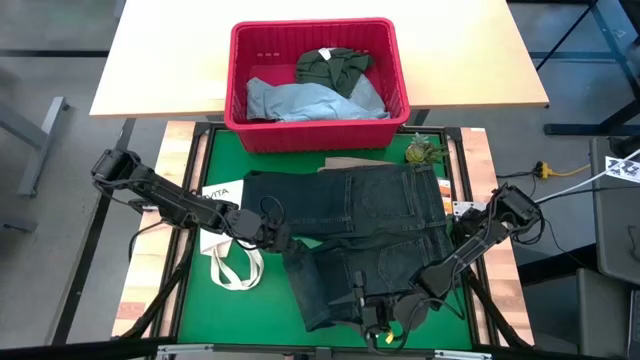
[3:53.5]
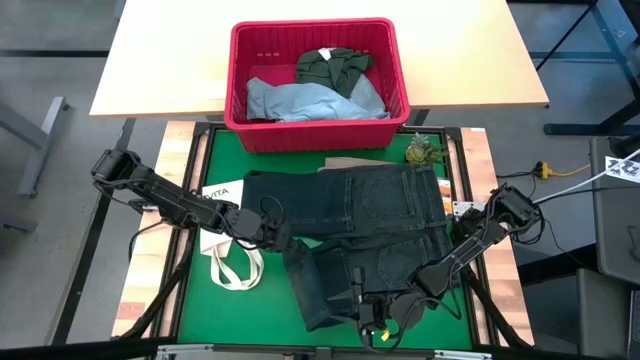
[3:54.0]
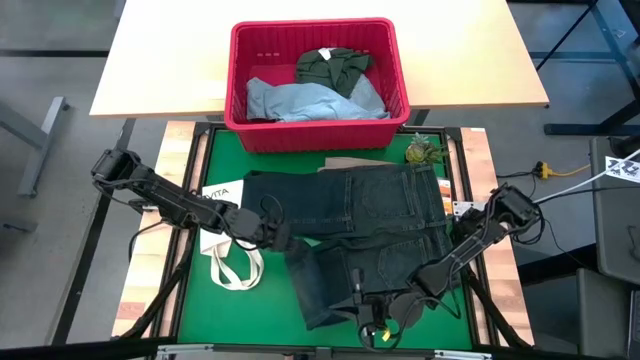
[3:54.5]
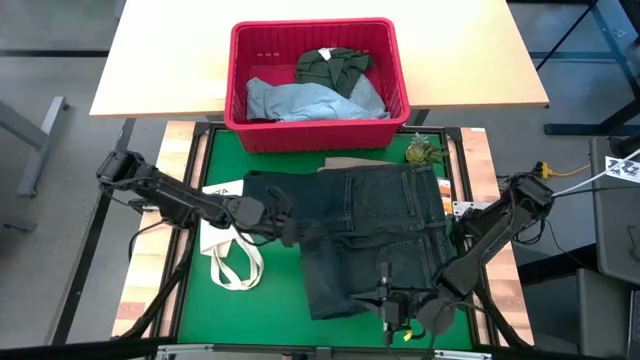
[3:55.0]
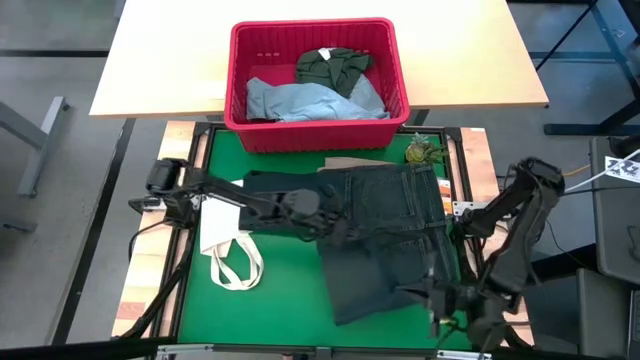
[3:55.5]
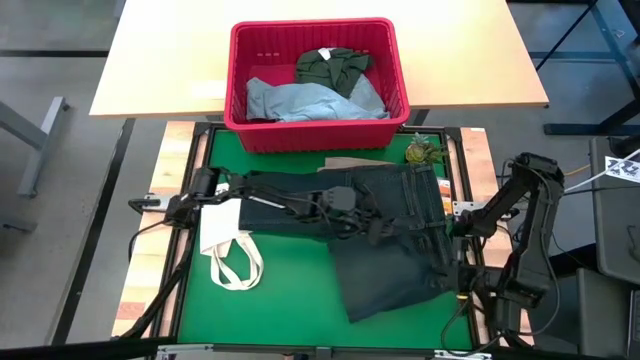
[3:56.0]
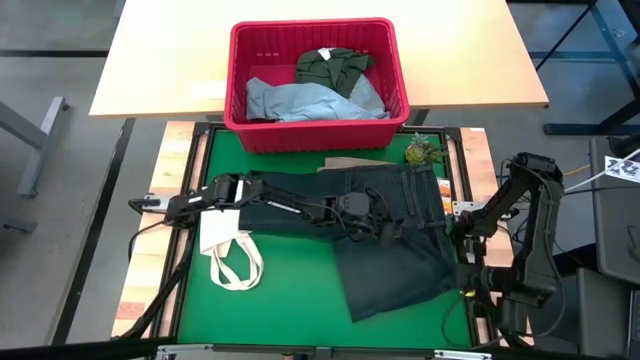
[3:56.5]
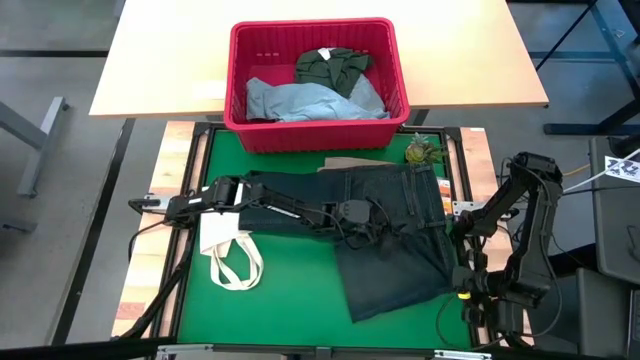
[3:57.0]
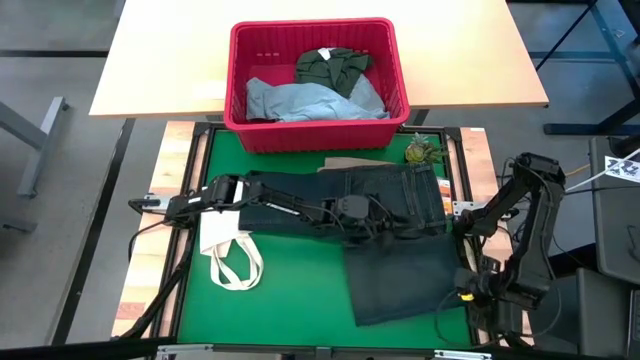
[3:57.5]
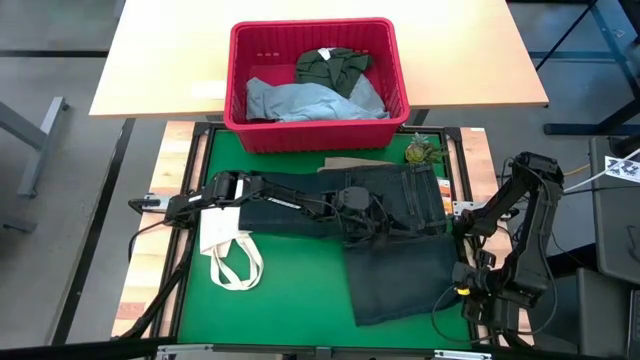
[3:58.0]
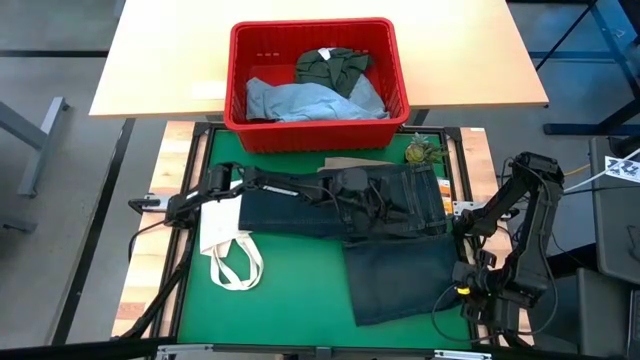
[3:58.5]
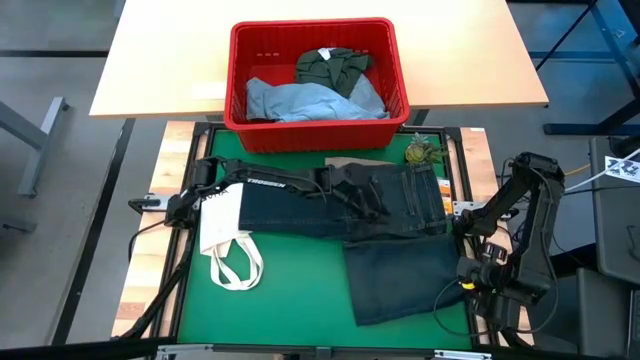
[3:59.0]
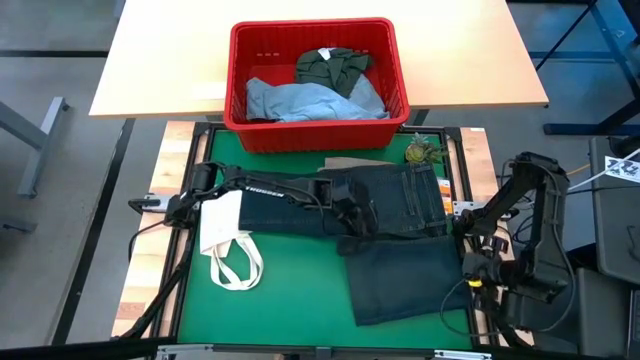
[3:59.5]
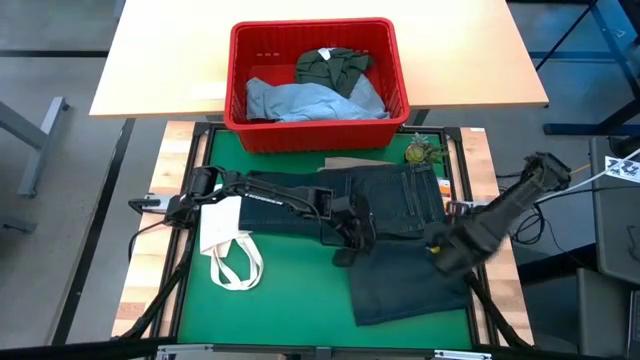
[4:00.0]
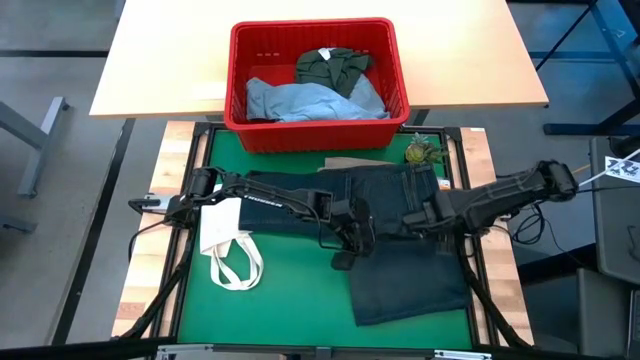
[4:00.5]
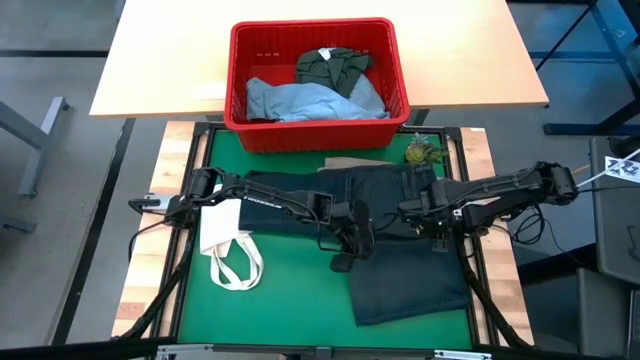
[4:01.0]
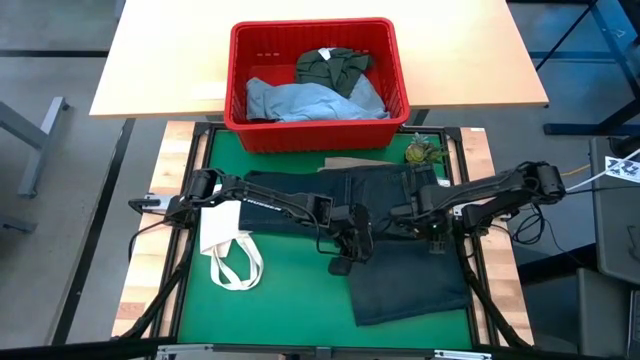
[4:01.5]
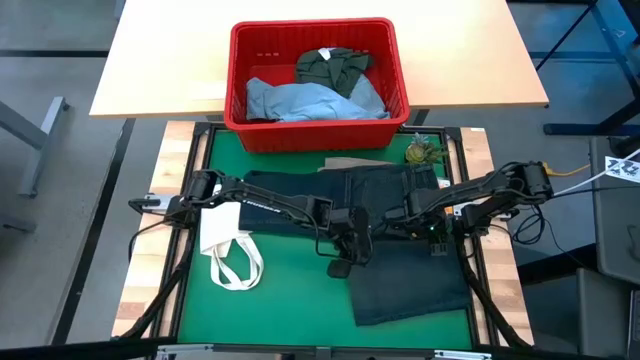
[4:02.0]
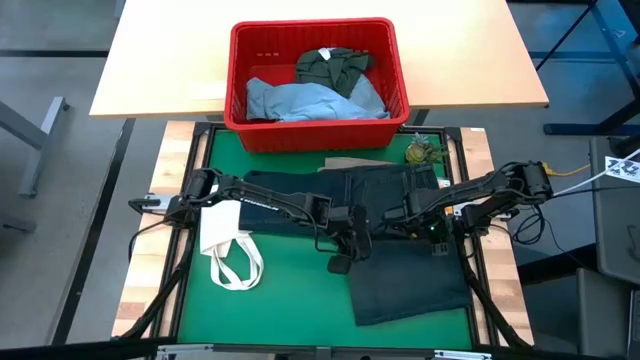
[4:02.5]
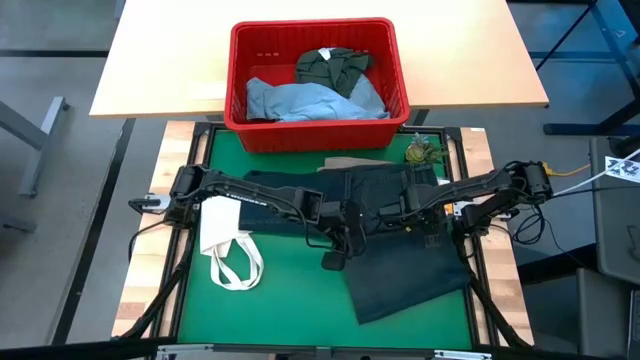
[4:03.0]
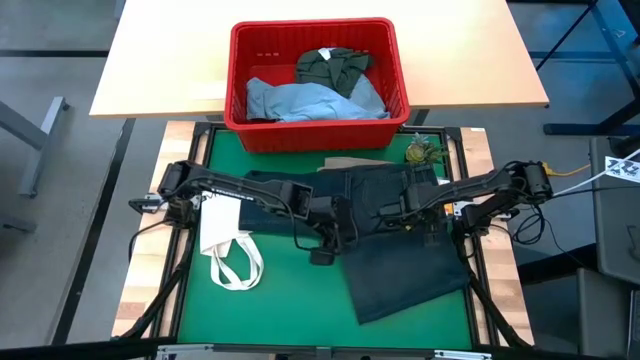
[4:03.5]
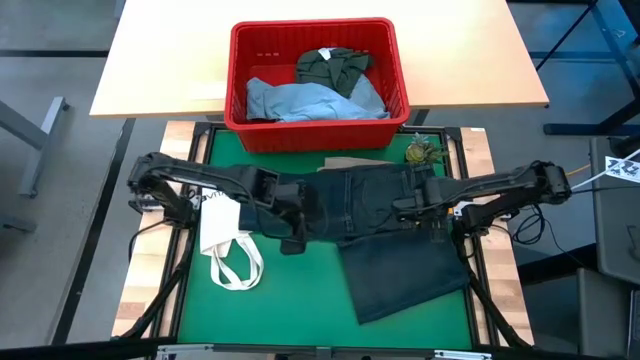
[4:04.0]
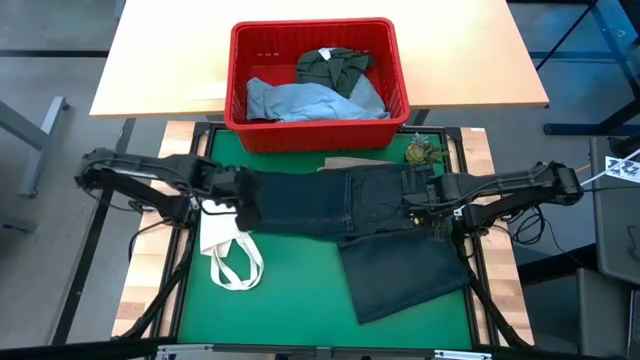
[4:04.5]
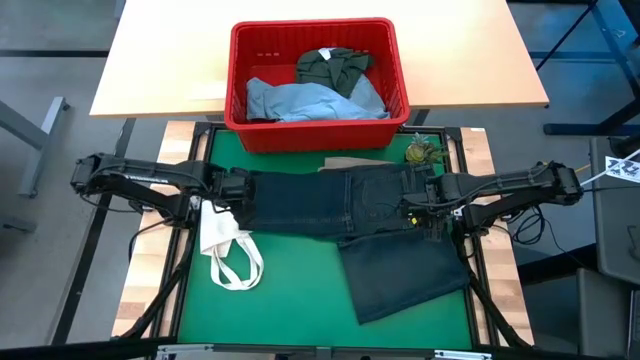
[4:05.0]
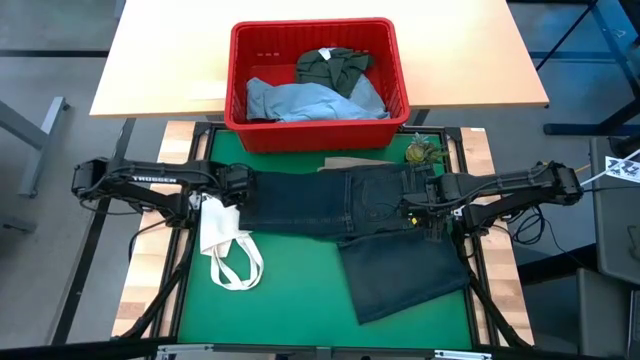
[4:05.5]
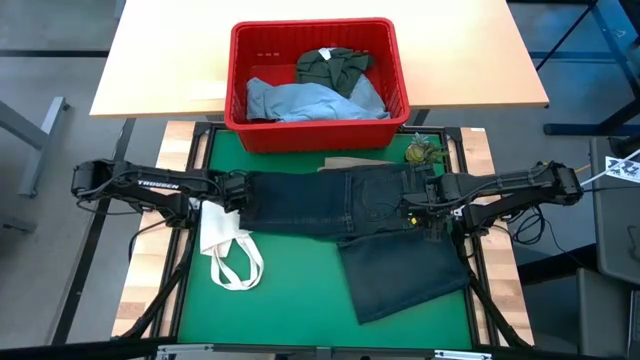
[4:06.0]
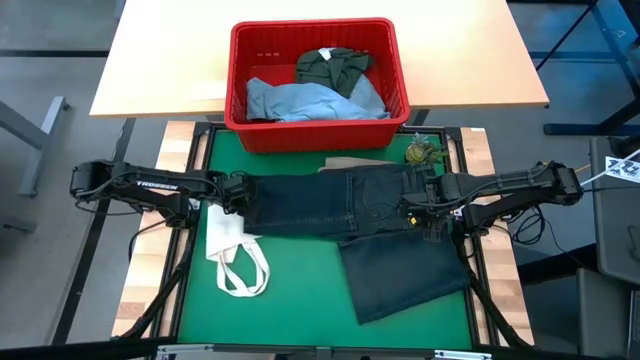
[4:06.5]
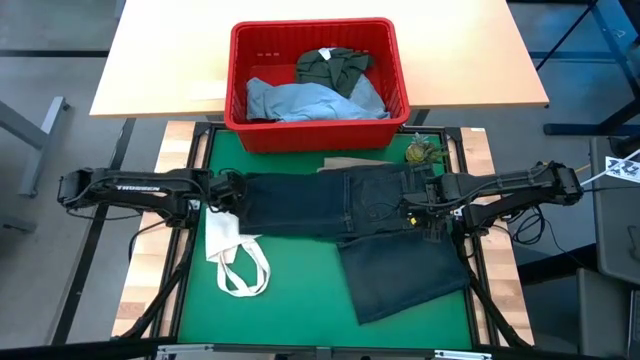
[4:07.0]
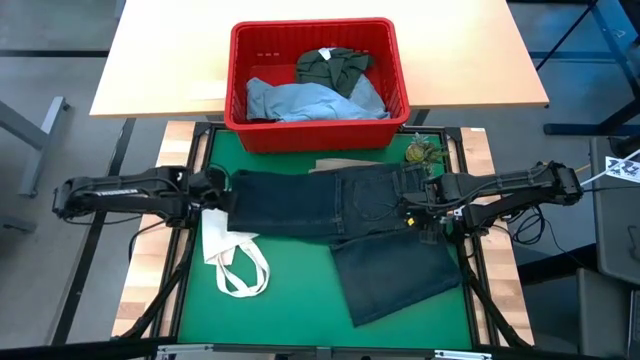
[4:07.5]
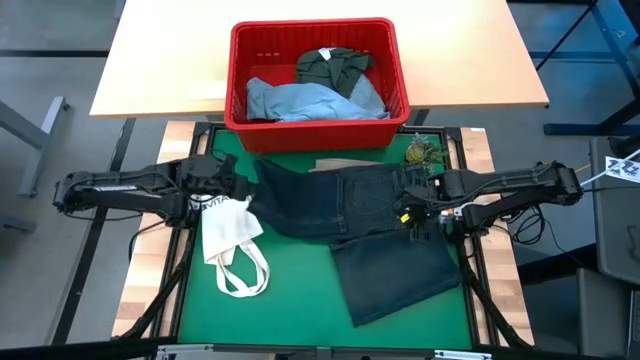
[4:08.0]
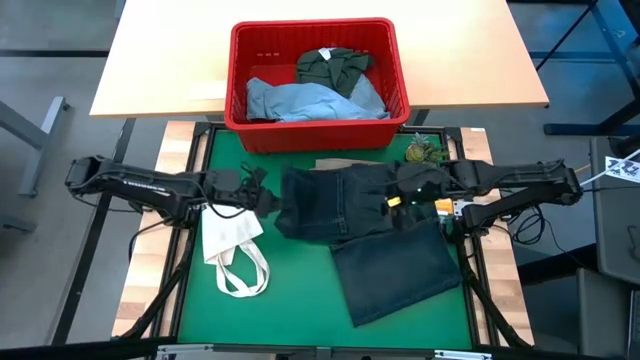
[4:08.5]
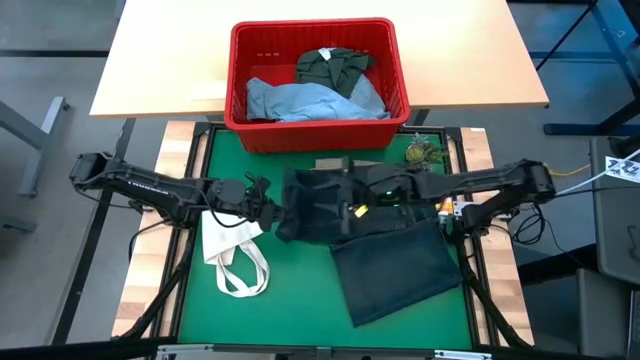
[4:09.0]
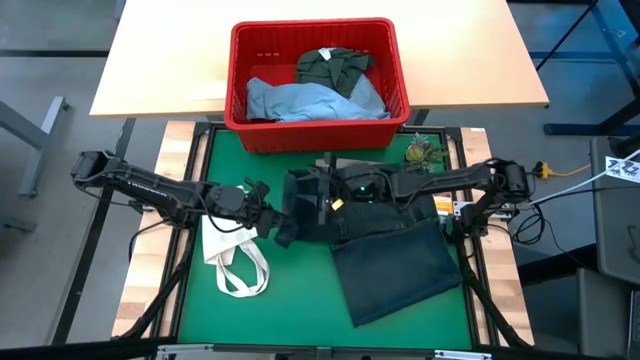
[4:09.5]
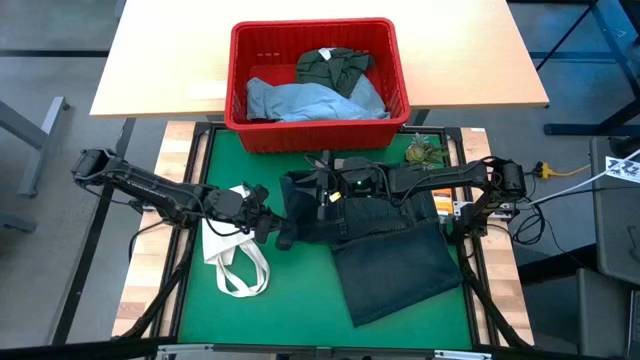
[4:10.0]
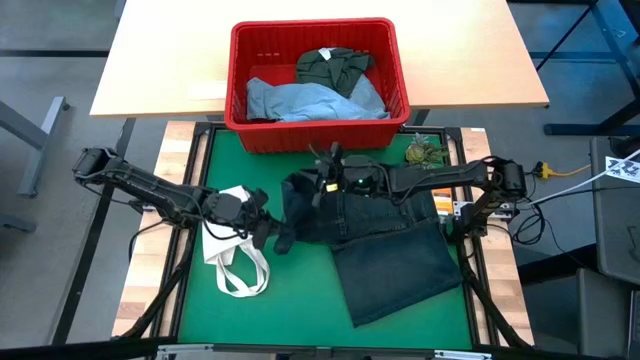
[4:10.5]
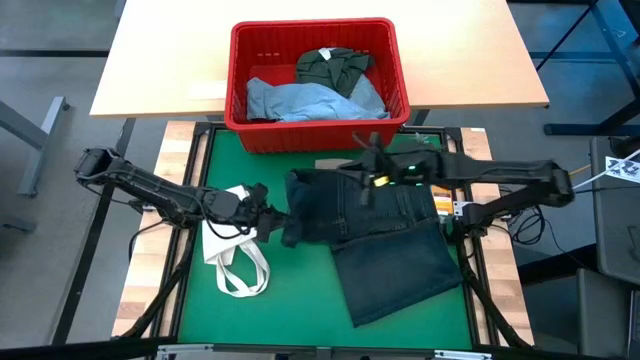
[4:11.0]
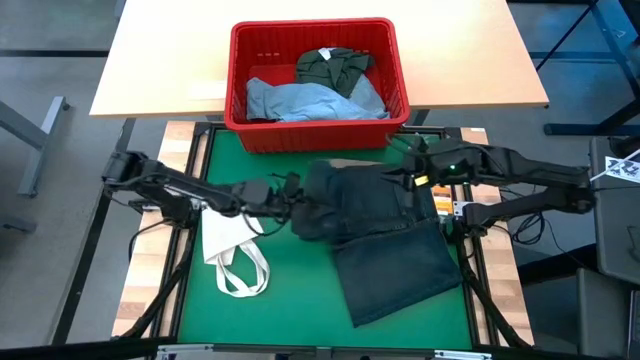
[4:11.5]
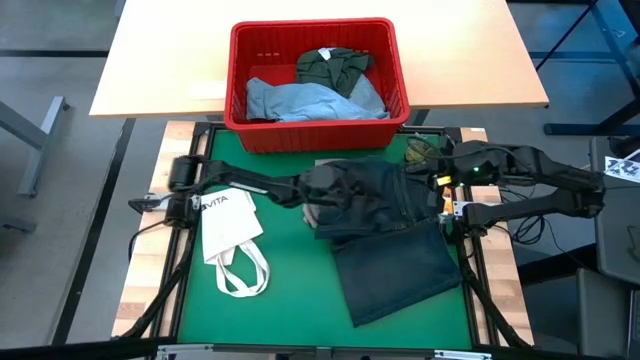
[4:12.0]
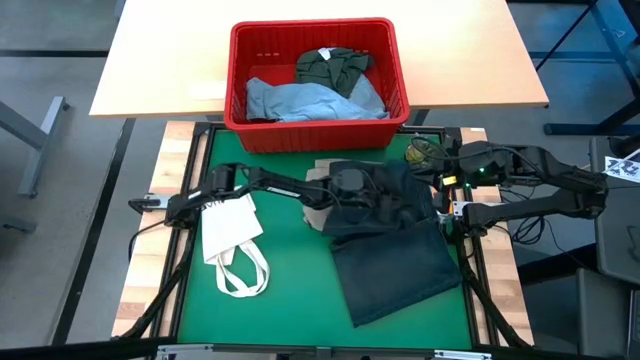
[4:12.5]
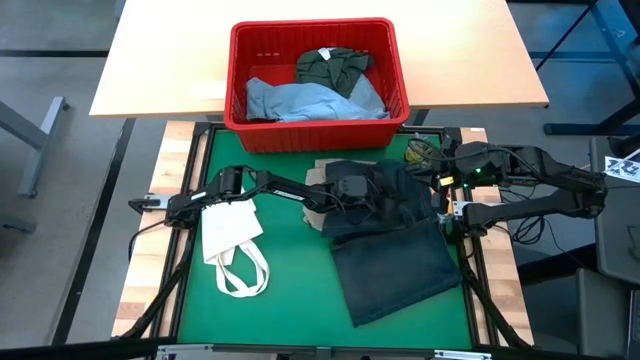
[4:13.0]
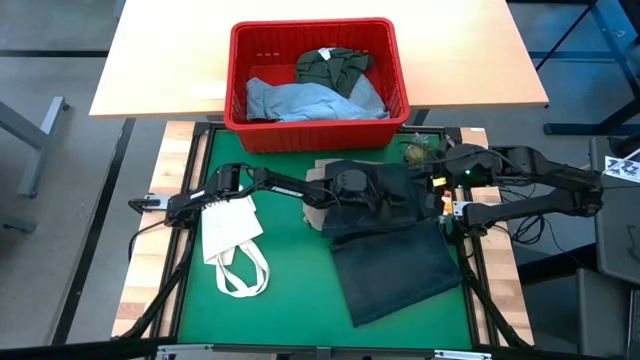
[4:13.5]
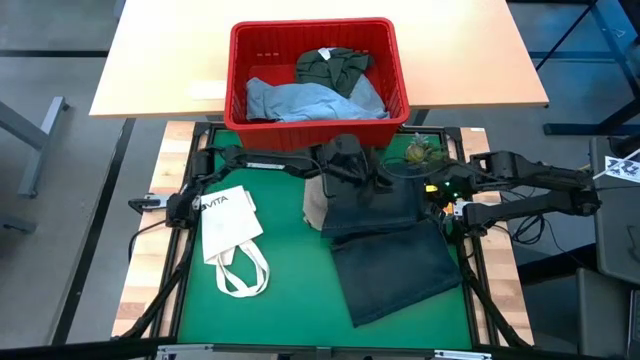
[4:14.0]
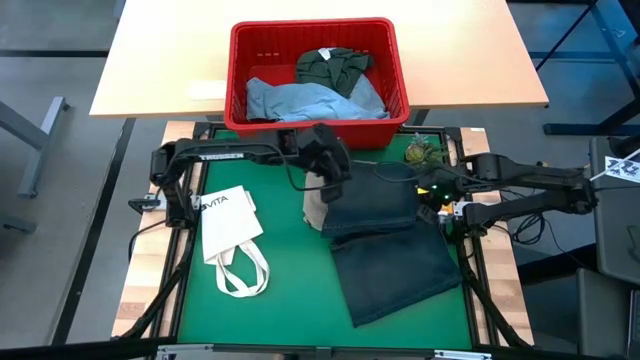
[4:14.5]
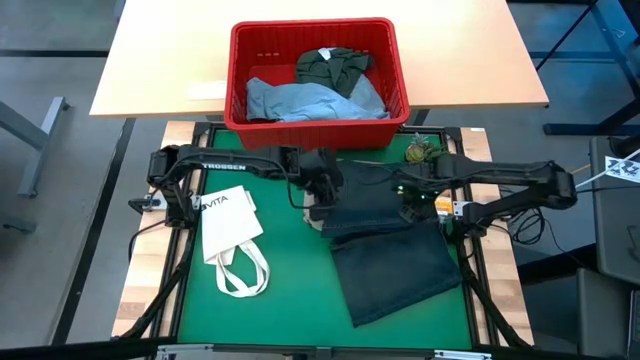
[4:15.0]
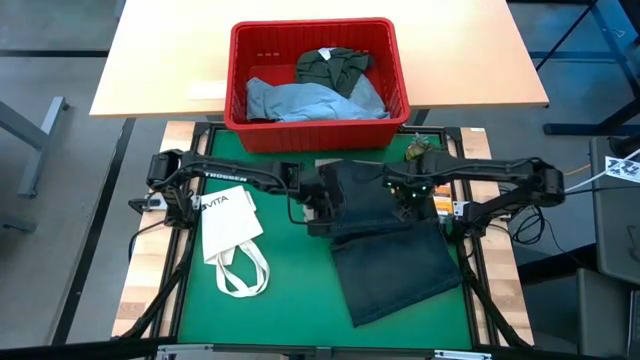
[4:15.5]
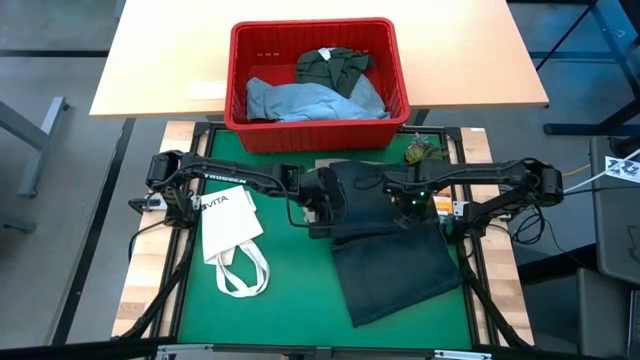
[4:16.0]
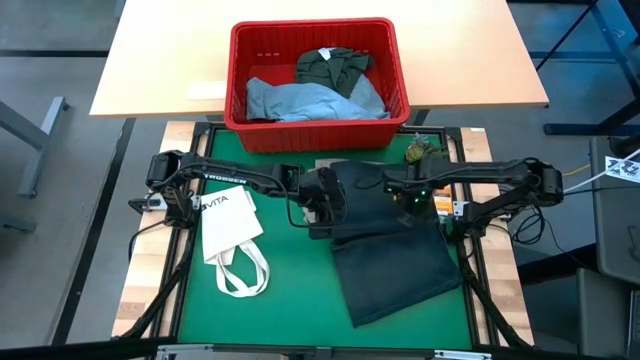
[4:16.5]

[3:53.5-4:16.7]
Task: Fold Laundry from Bin
Fold the dark blue jeans
